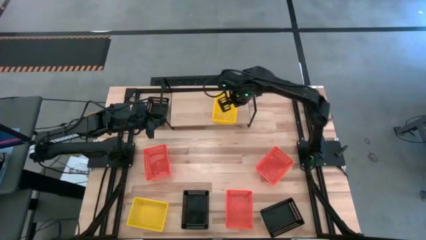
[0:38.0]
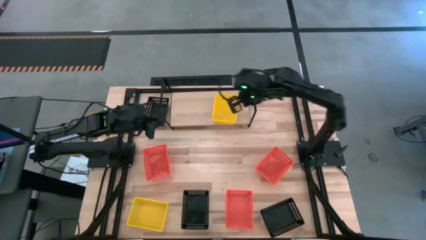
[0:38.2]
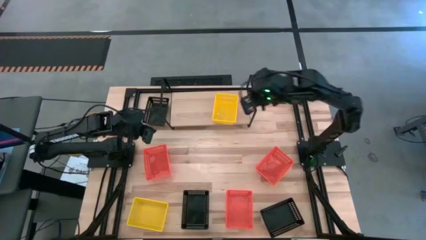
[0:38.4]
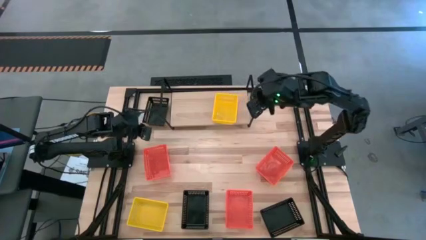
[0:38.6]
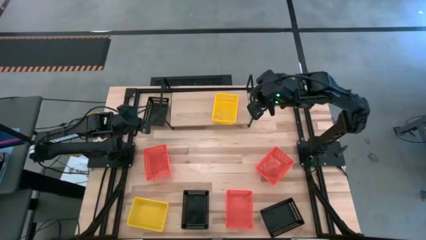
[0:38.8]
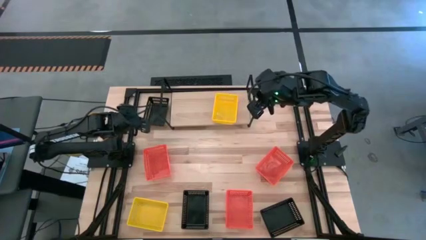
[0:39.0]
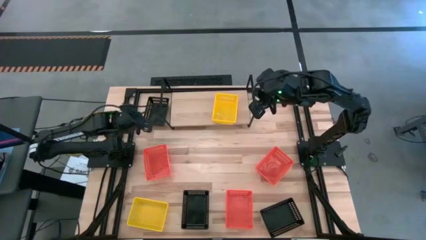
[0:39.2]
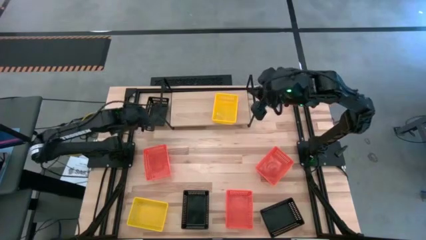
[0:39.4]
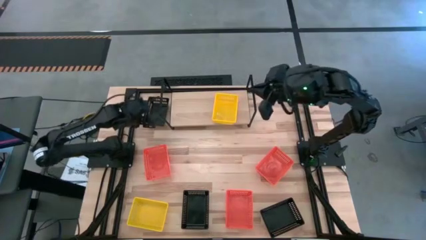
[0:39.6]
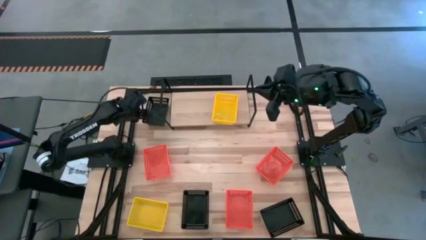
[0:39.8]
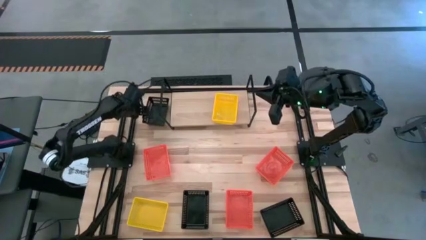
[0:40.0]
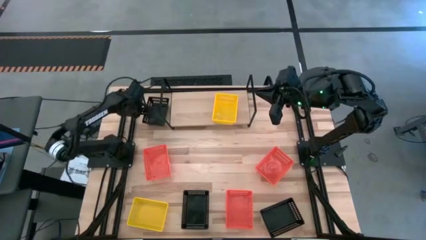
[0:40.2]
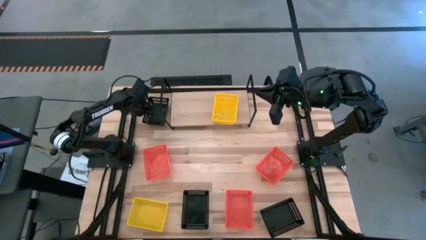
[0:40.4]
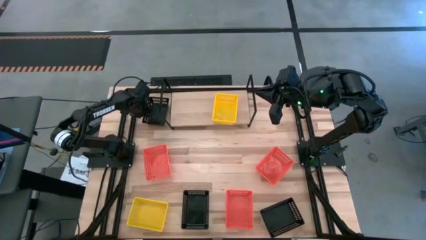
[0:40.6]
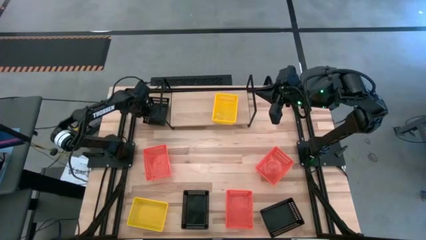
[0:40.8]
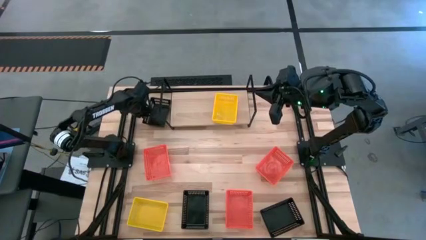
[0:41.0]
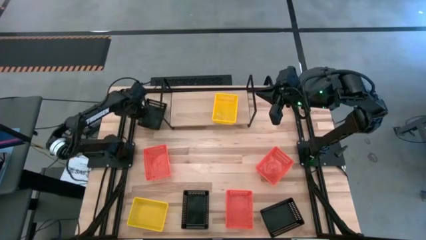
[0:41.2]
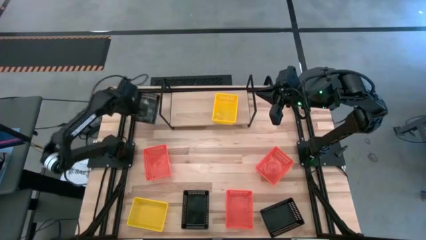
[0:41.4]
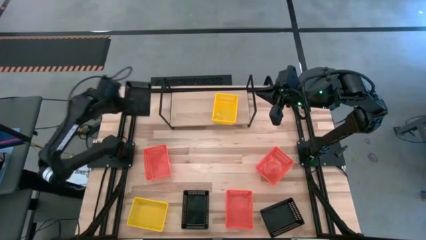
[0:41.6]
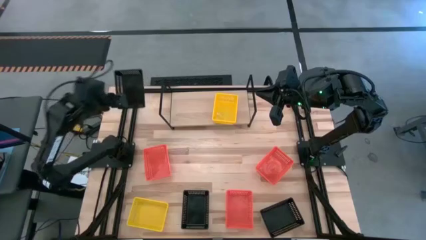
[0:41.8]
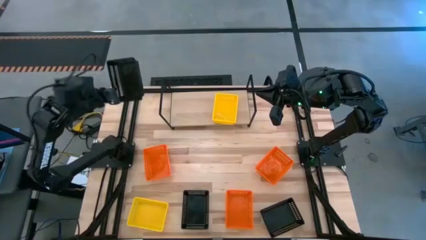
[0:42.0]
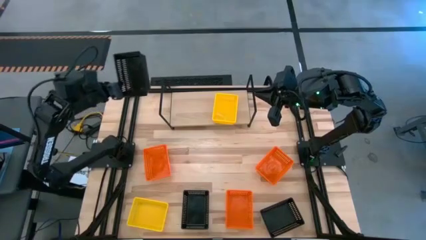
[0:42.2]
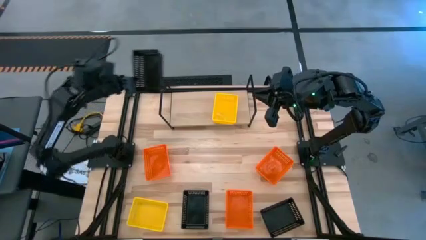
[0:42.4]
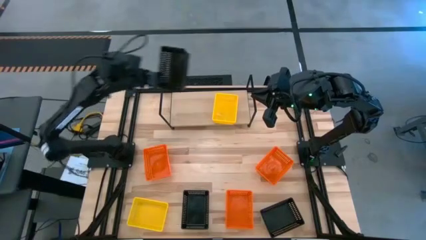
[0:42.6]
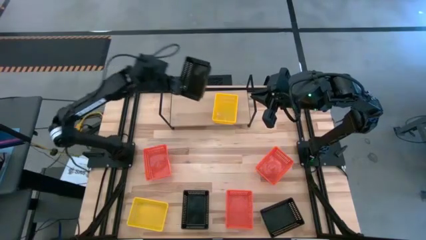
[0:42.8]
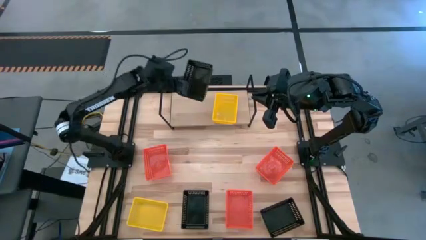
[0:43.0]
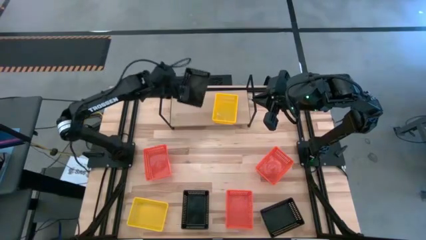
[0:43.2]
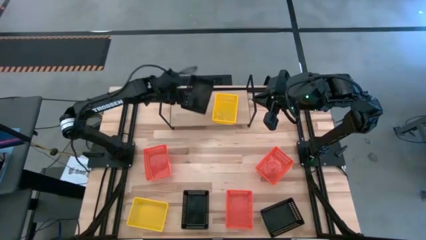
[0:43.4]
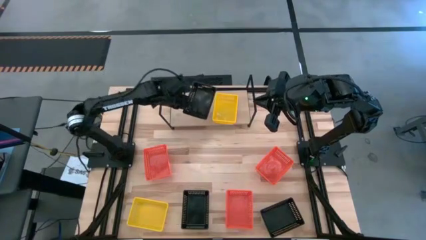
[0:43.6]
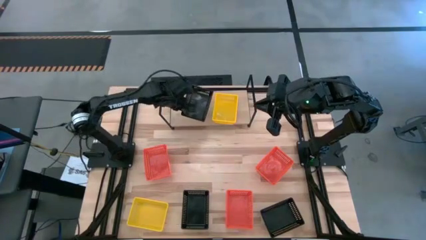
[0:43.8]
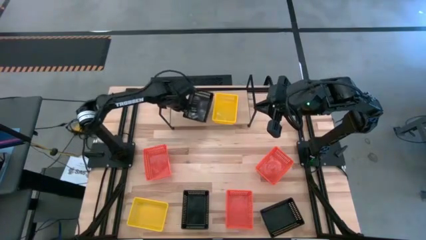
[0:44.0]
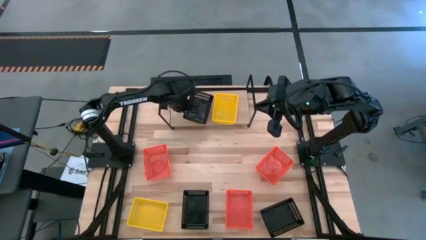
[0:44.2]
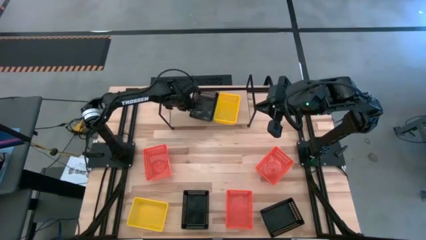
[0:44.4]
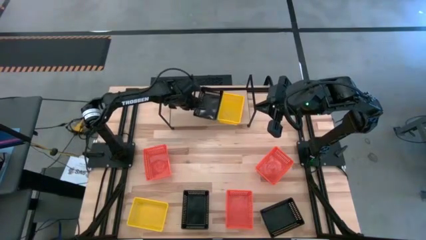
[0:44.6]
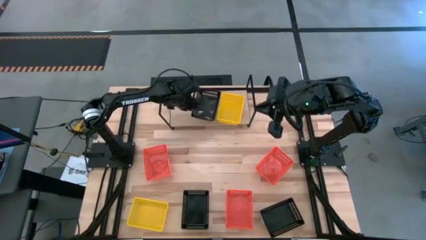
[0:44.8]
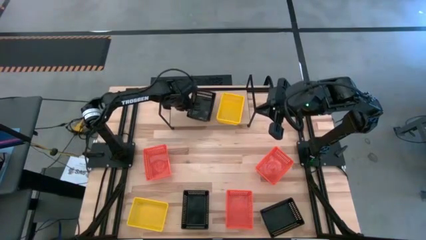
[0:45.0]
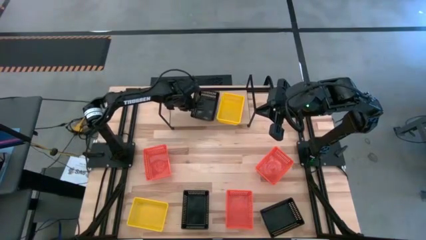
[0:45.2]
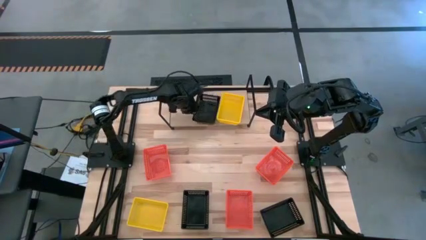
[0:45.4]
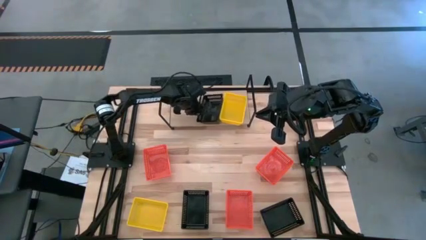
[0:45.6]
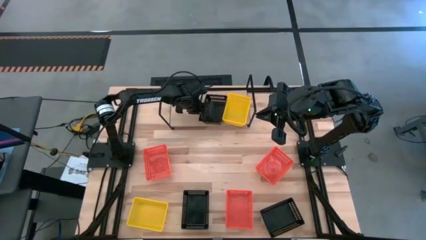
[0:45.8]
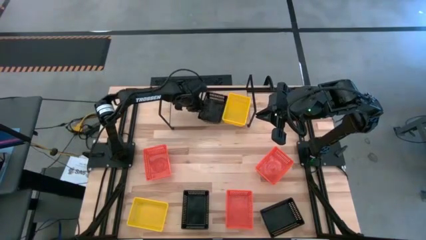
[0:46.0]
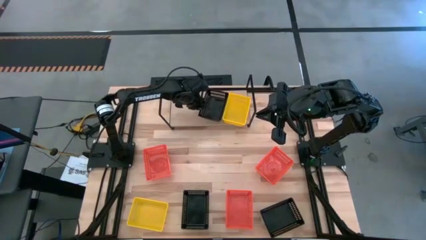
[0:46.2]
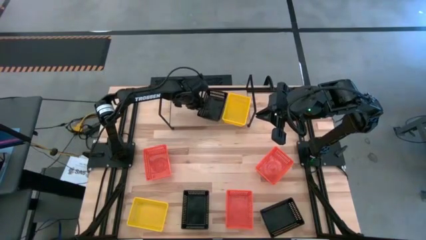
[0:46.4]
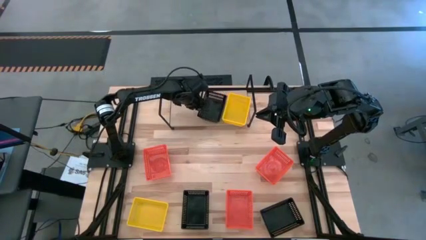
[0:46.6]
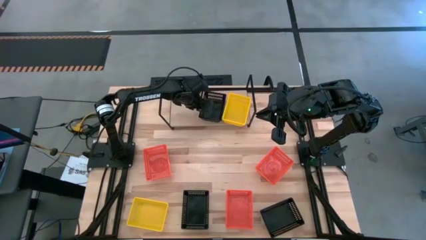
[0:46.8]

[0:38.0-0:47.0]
Task: Stack baskets on shelf by color
Put the top black basket on the shelf
